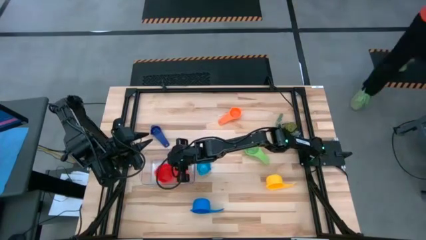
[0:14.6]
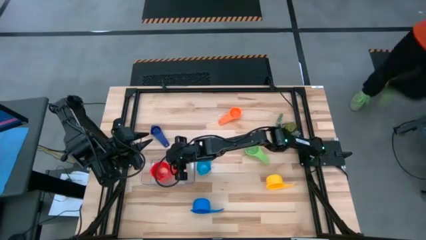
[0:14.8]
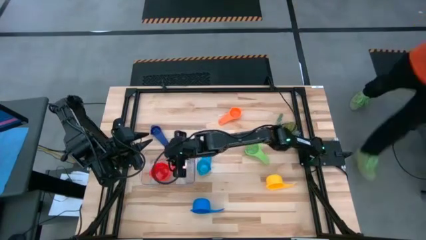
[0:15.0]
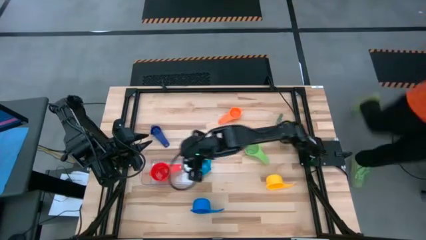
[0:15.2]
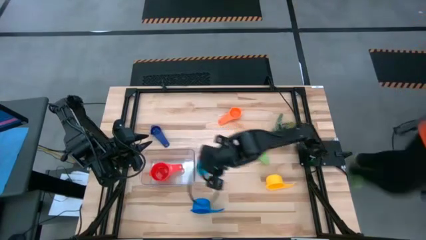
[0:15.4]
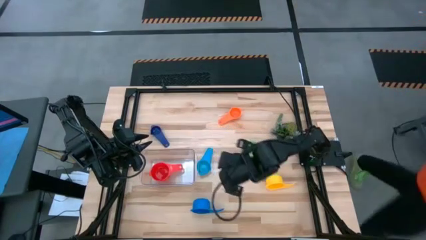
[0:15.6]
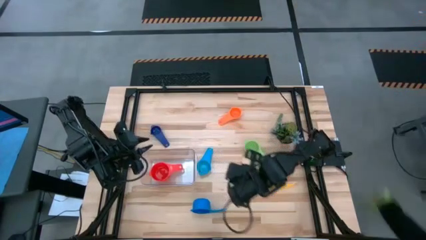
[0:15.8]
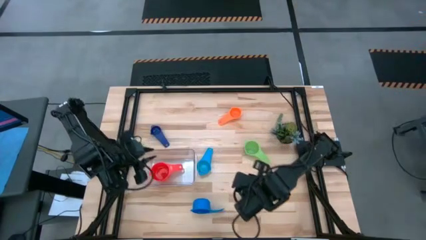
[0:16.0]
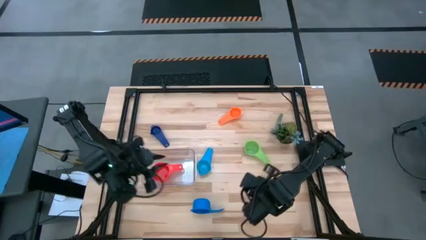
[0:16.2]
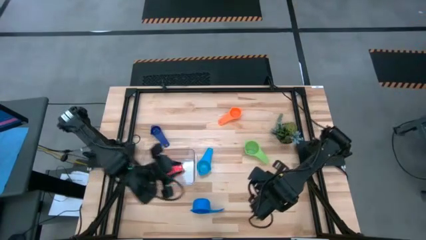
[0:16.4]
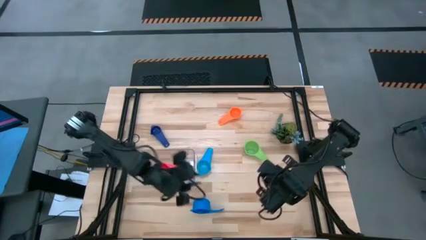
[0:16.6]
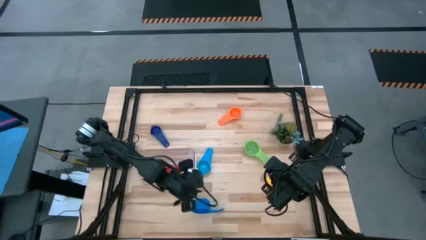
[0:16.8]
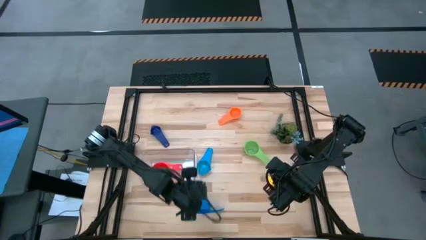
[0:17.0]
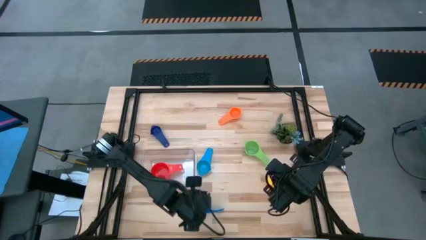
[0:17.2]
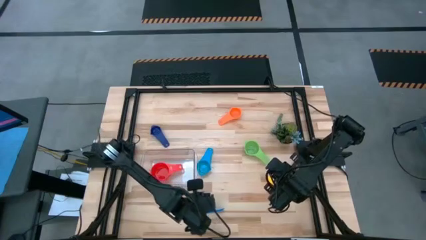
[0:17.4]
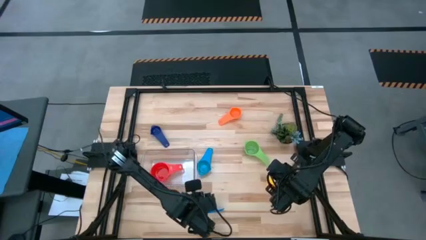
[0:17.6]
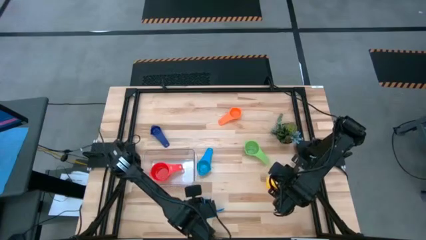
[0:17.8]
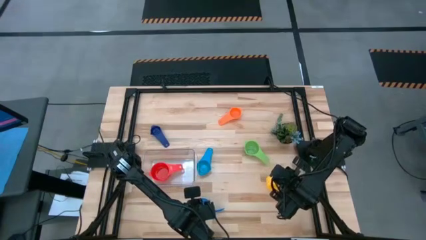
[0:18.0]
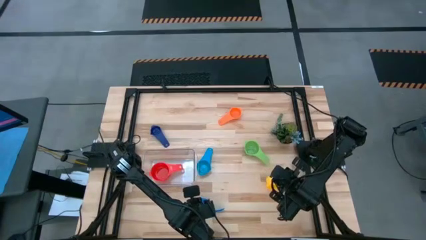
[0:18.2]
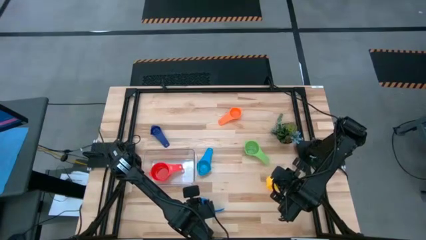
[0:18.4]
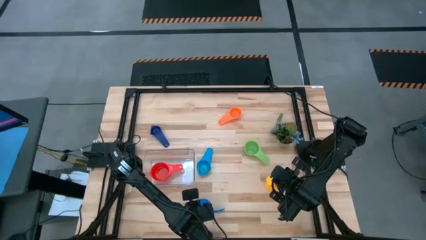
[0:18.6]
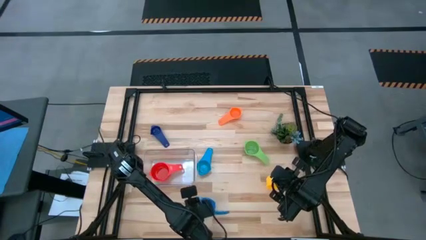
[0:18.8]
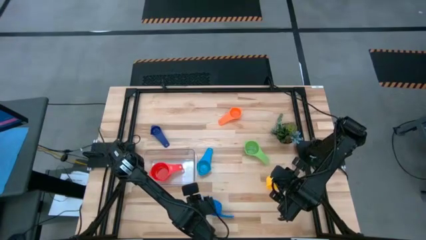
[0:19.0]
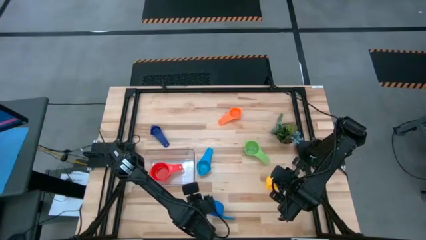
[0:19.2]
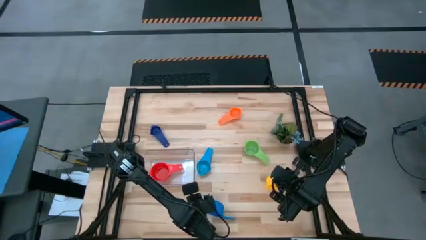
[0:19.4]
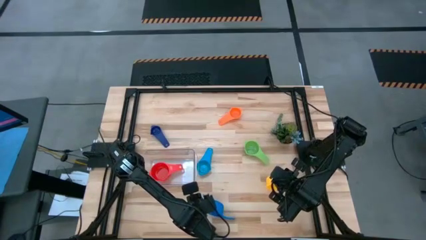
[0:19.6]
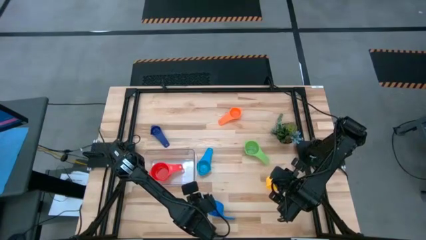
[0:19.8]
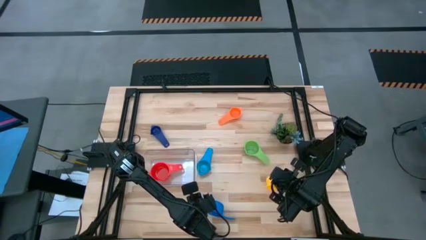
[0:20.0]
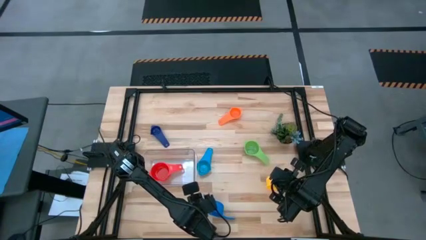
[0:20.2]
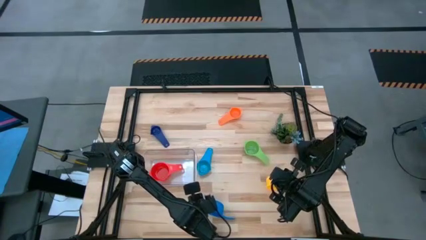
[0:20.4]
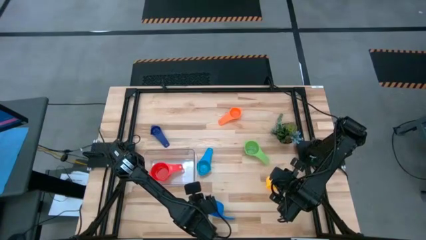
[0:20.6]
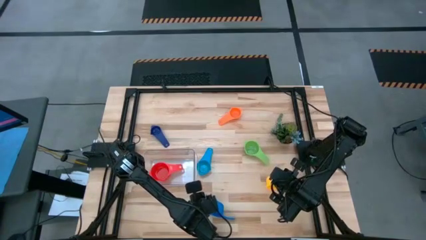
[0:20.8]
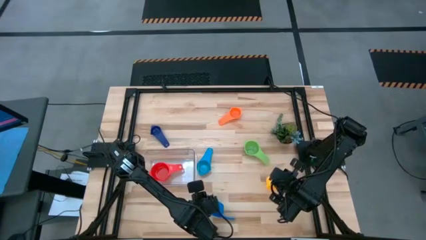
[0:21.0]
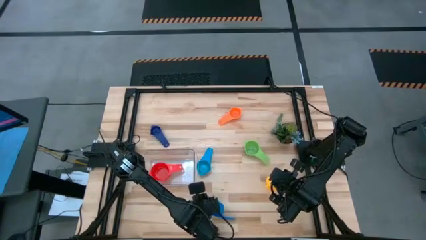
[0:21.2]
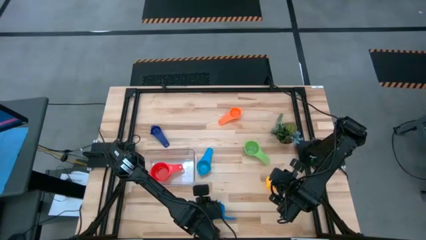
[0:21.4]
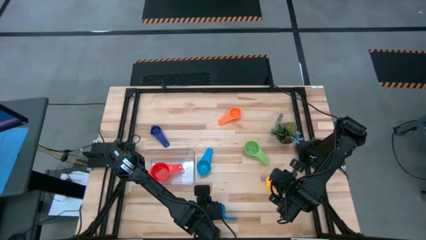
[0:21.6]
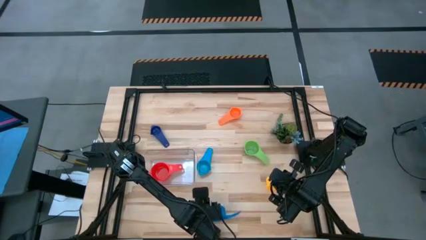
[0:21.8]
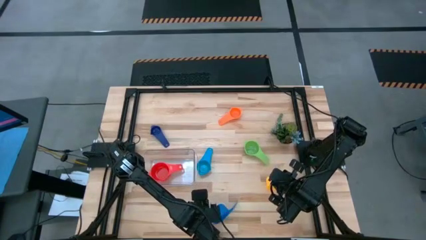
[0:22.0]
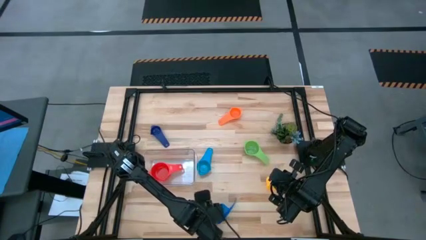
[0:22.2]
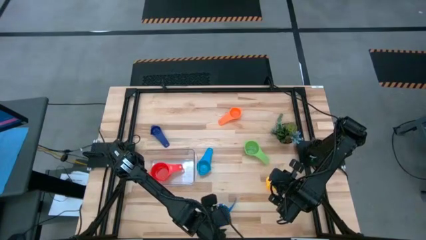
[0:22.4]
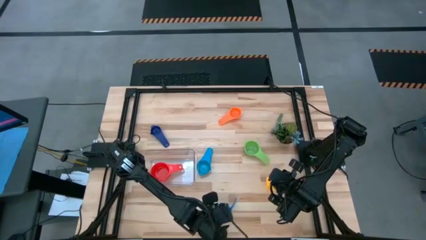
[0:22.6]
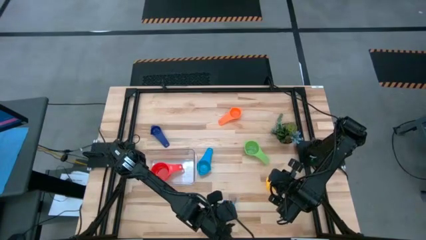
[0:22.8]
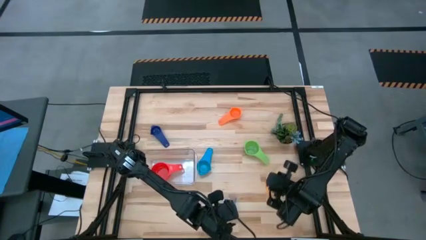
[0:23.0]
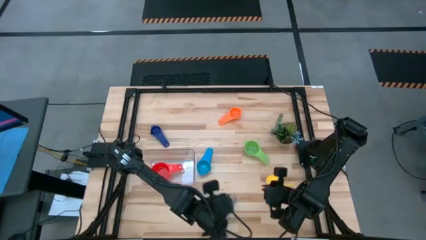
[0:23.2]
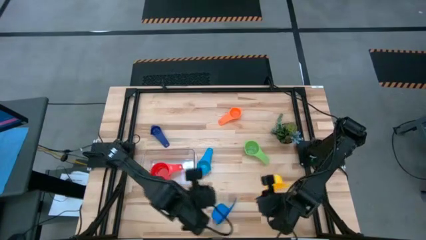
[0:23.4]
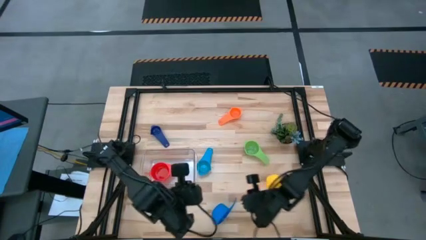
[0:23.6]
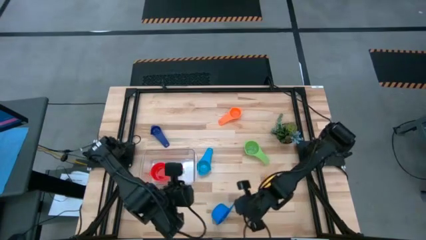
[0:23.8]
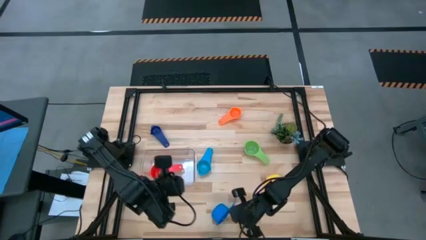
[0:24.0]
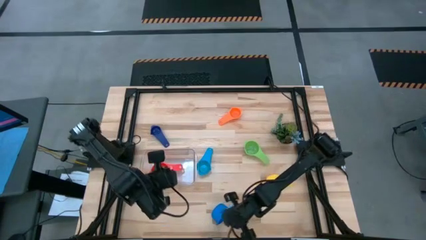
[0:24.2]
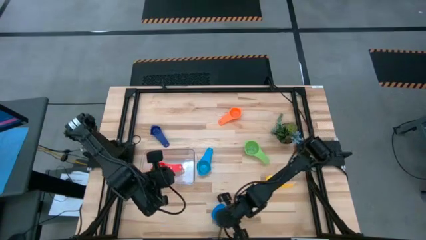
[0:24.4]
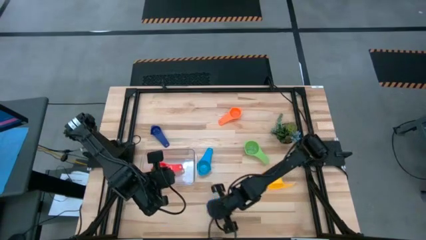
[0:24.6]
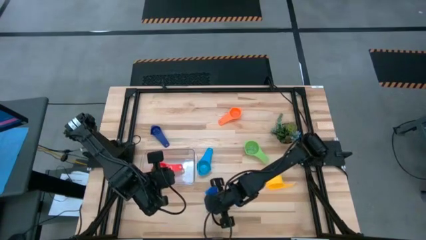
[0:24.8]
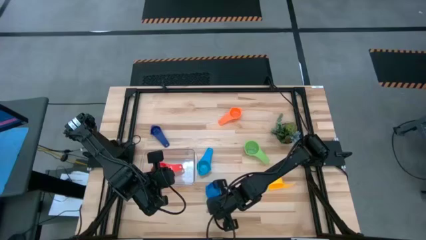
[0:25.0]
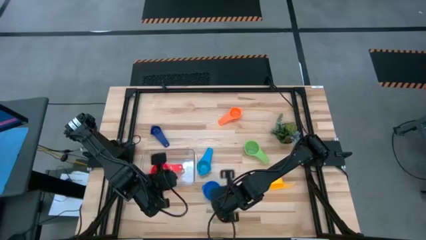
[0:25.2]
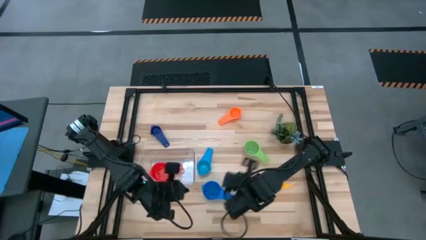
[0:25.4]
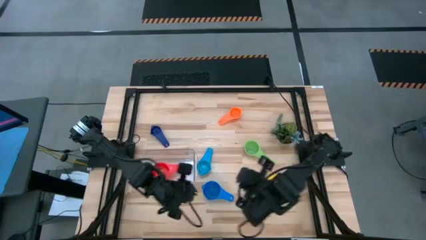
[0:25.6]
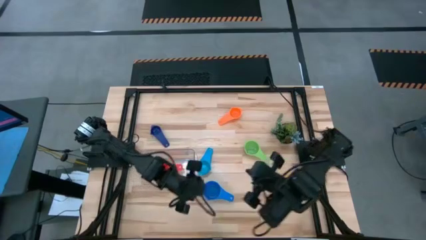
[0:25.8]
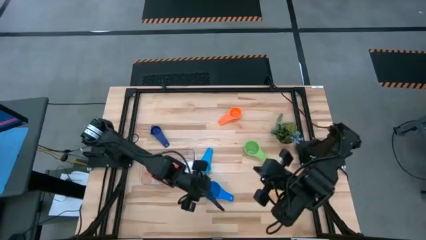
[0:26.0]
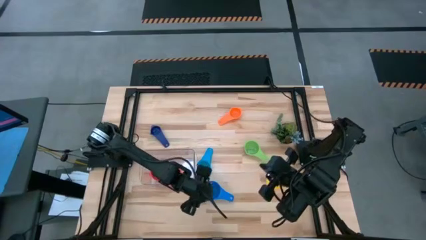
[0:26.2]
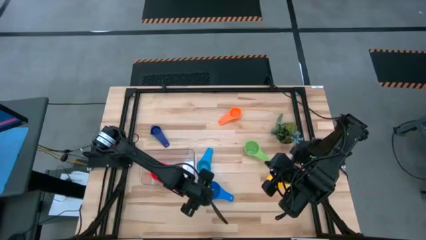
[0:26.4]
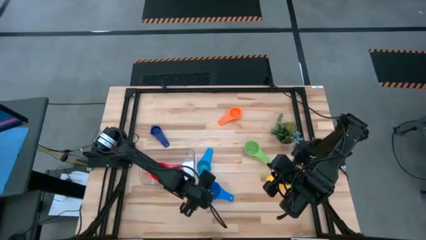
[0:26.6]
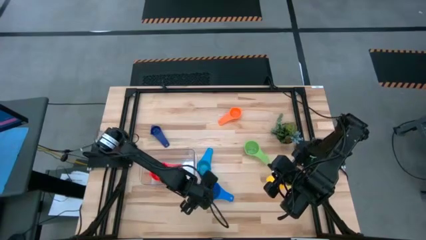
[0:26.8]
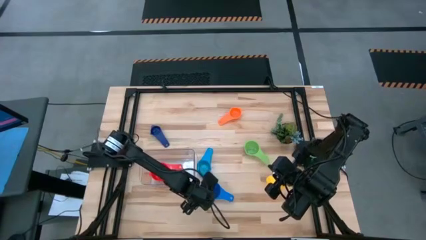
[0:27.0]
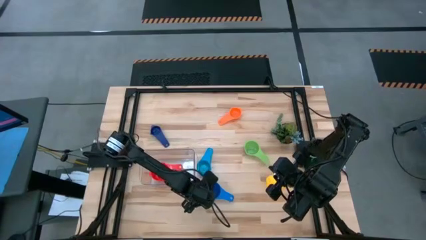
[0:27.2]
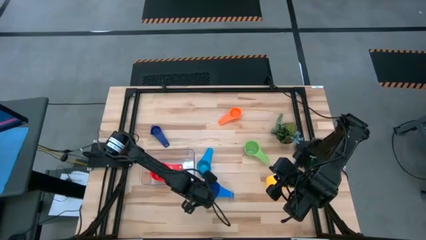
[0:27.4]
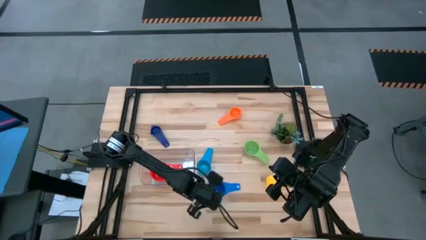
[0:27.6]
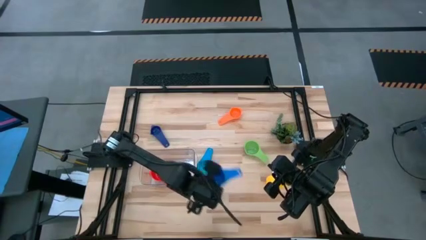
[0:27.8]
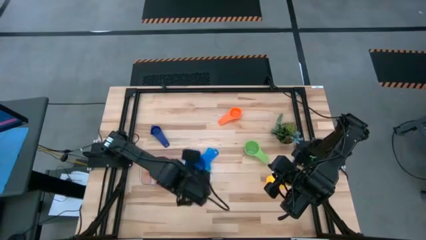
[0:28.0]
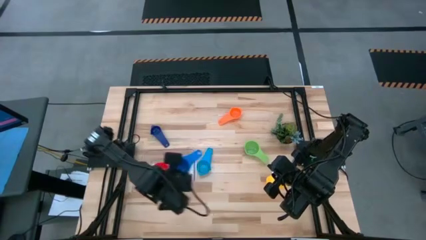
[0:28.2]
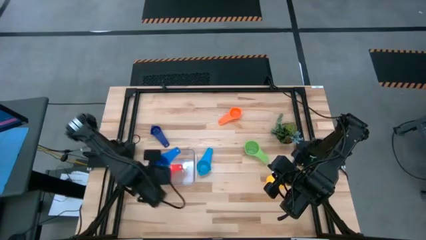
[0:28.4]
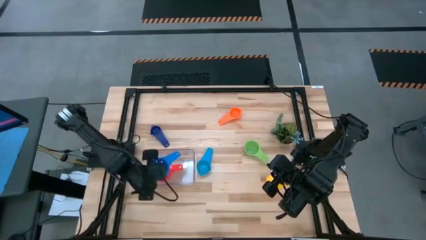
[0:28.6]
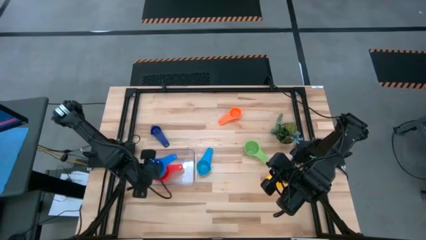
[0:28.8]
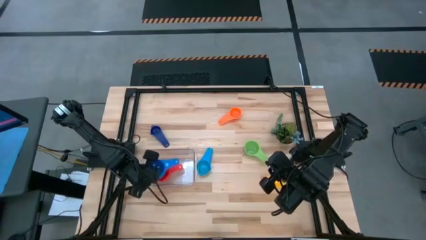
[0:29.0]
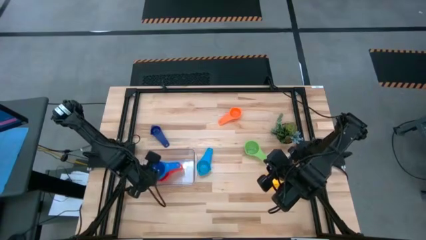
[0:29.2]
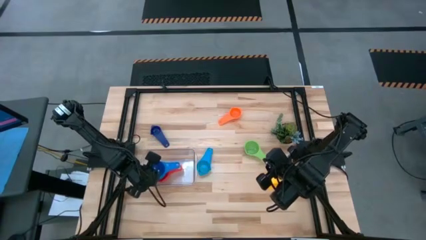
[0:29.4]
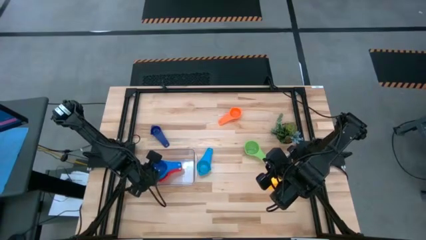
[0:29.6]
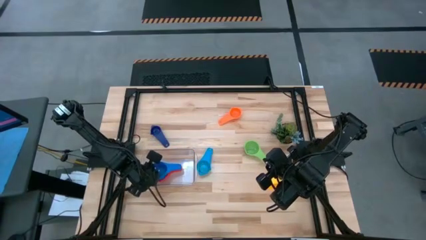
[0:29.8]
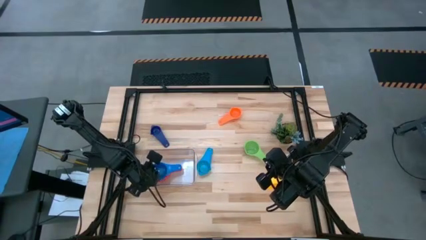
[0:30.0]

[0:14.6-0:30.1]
Task: Nest measuring cups in basket
Stack the blue measuring cup on the red measuring cup in the transparent bin
